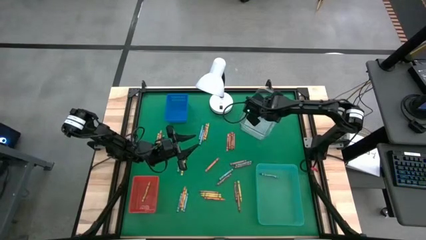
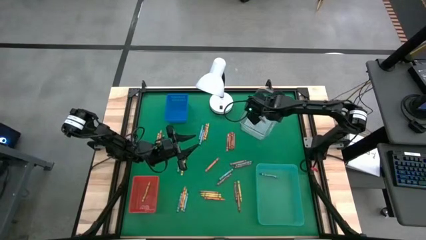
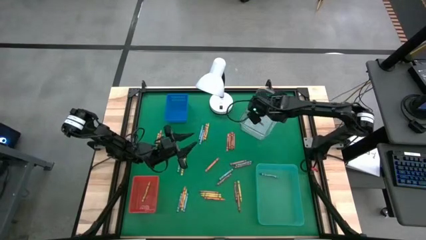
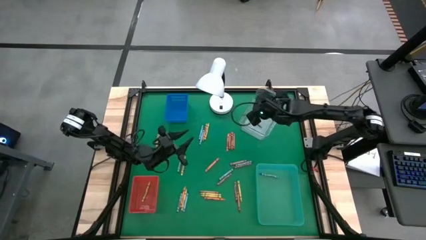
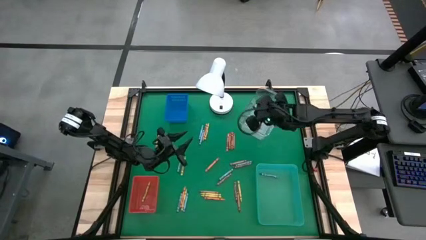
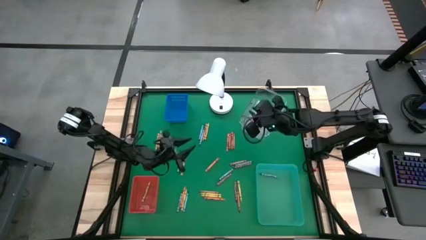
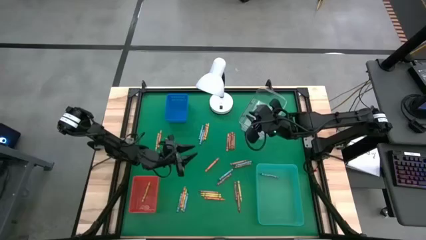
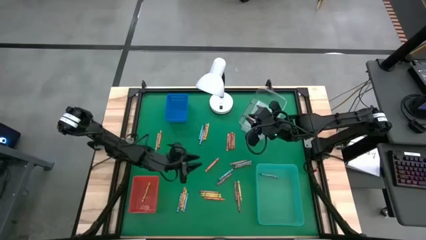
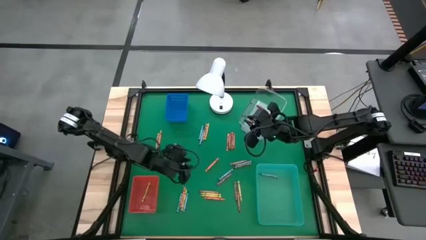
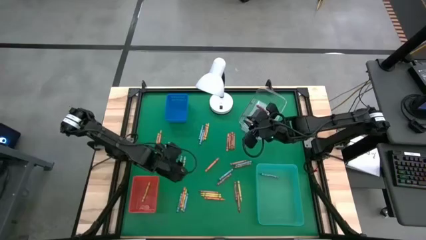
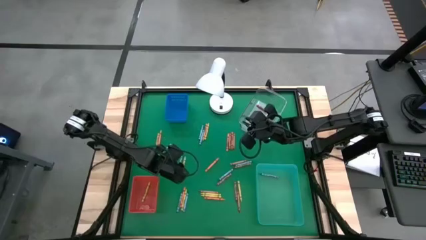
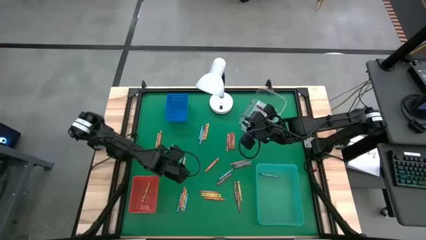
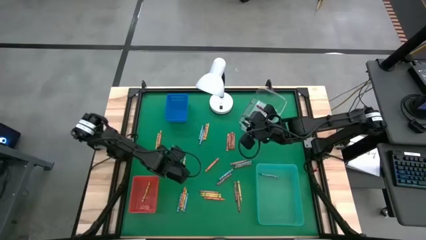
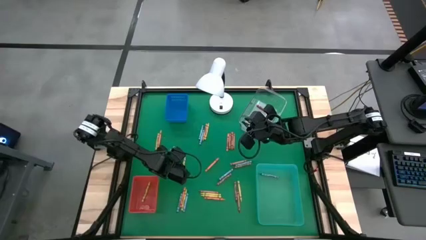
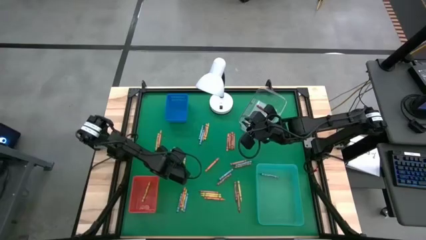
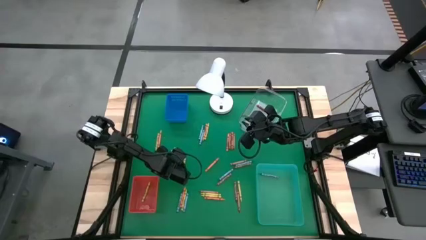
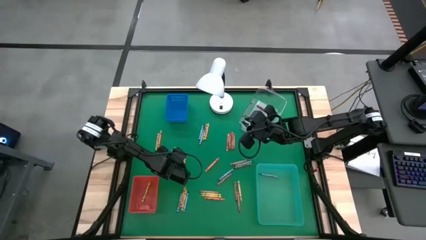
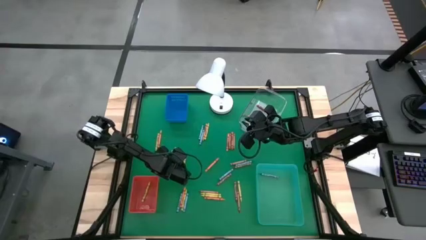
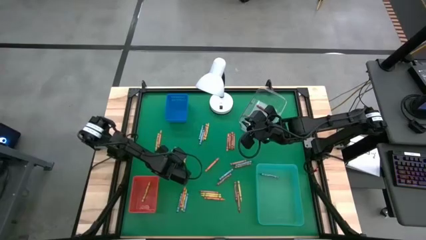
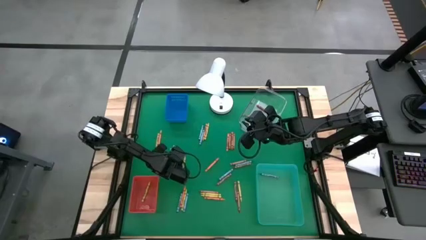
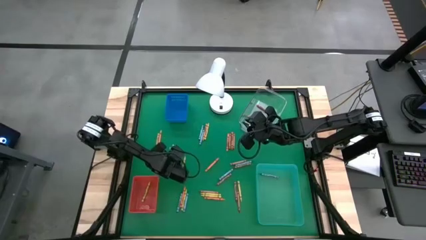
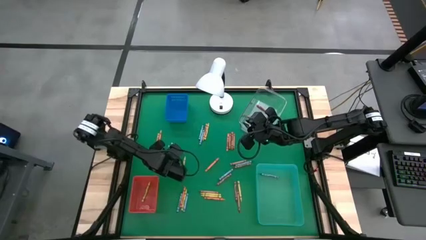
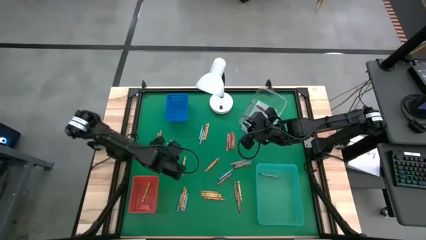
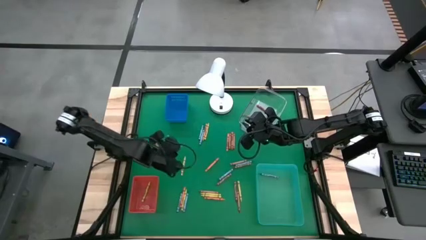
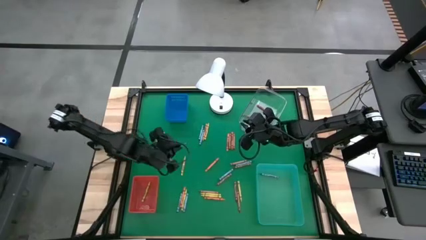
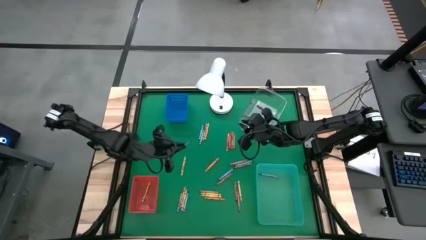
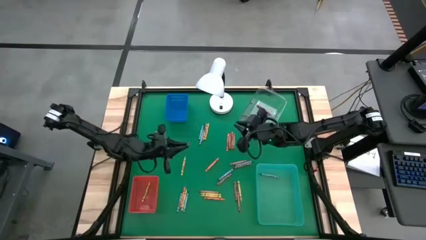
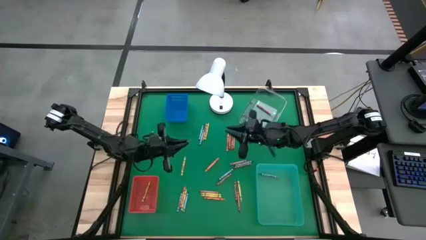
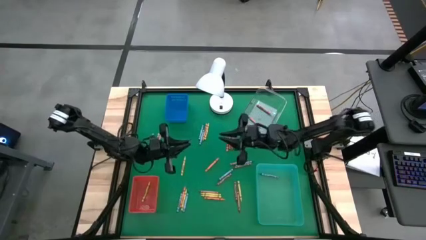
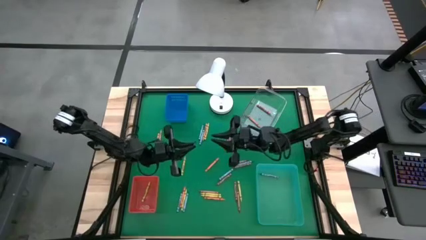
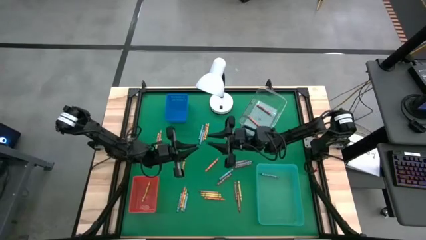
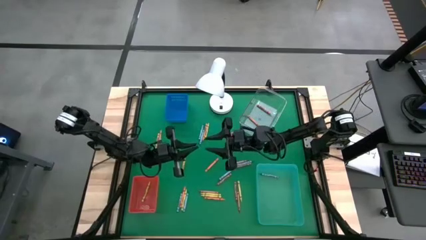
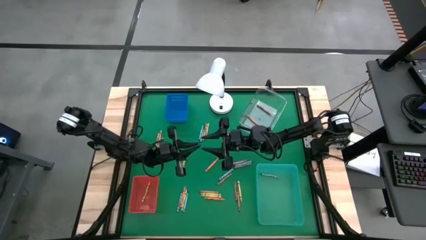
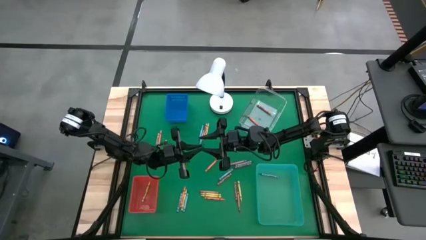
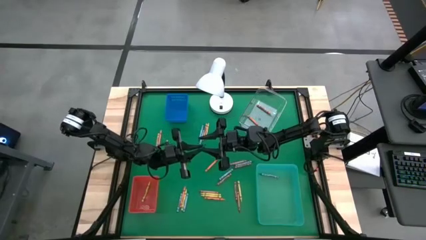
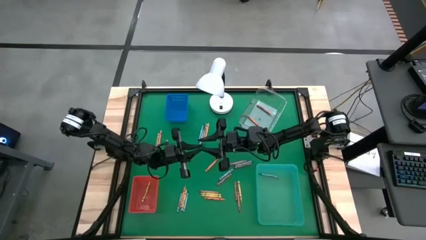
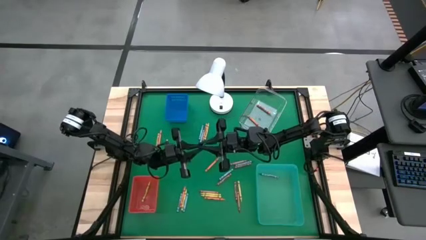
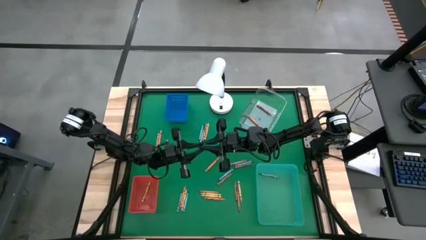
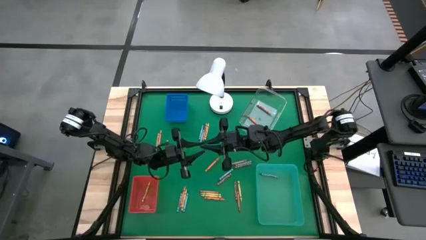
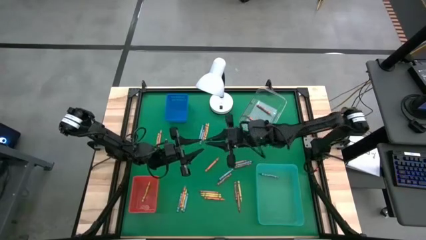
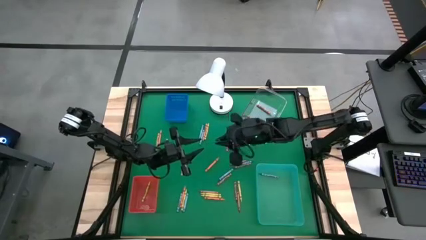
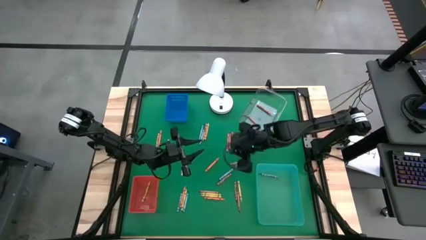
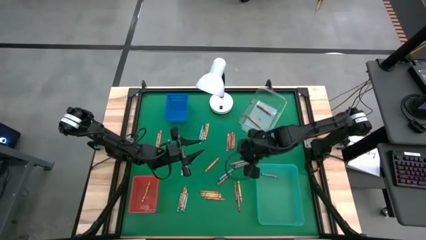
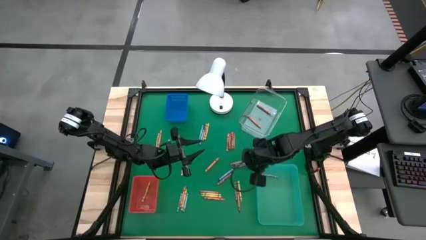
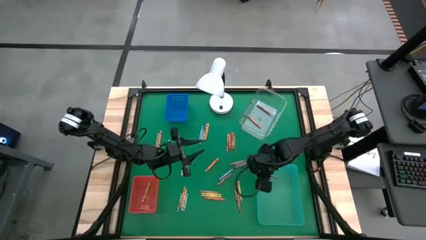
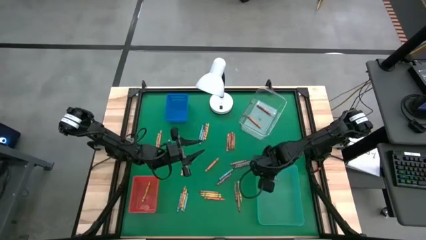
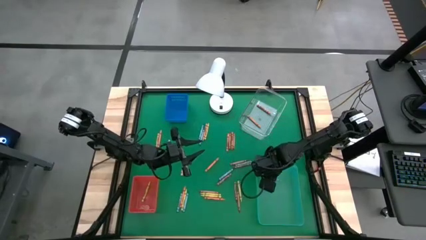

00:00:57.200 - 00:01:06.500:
Task: Sort crayons
Put the blue crayon into the green bin

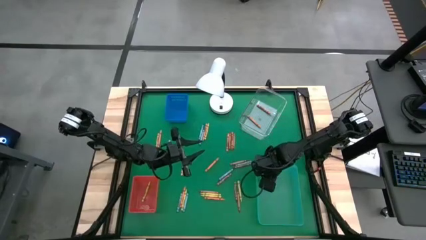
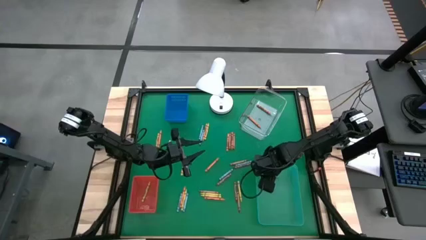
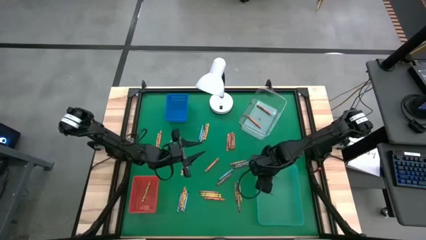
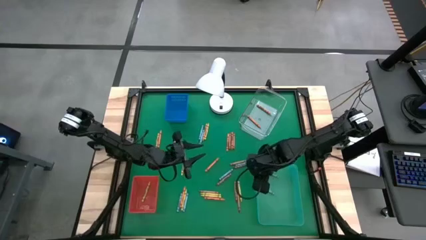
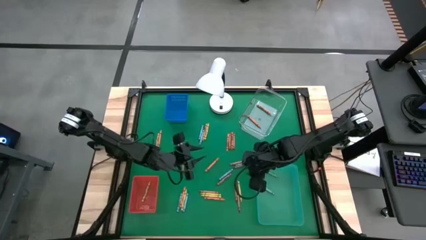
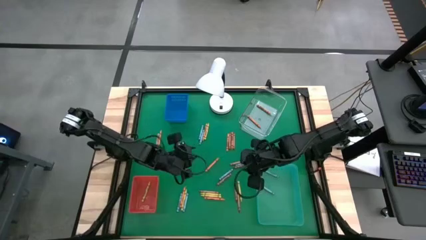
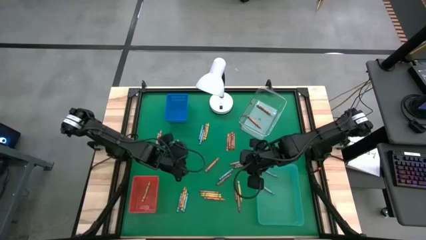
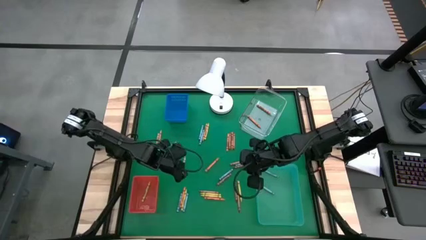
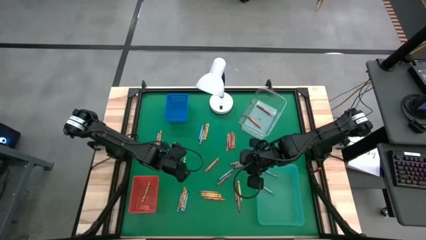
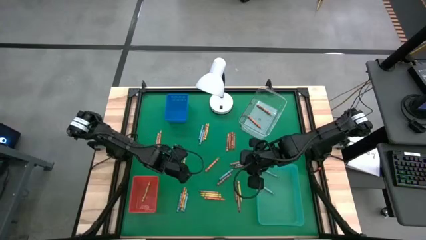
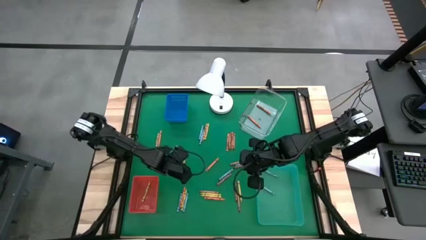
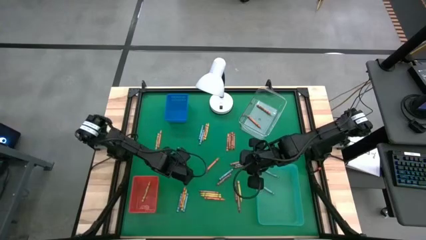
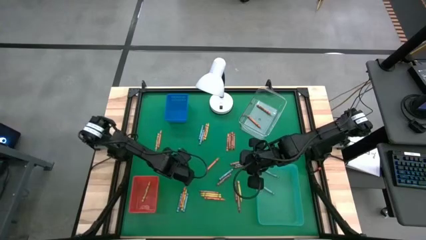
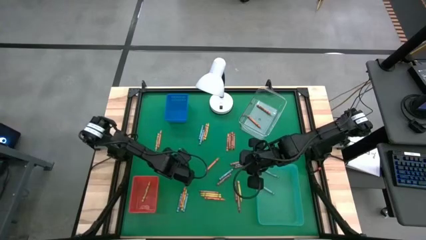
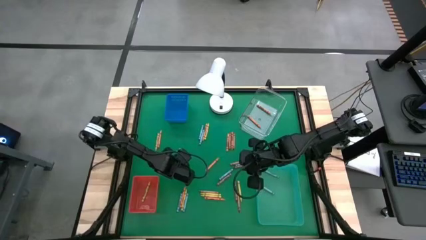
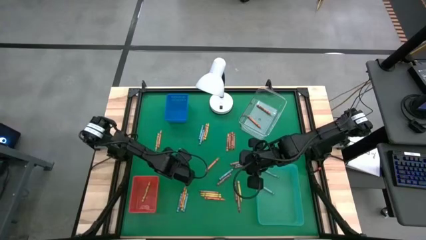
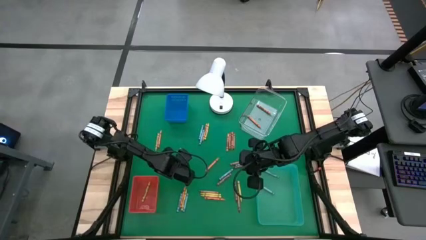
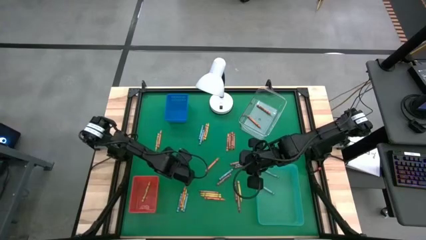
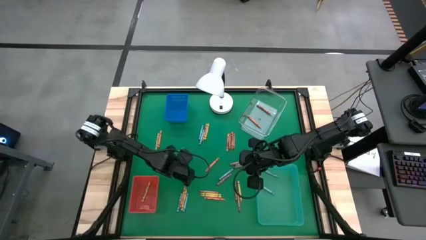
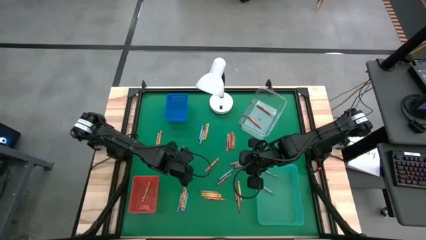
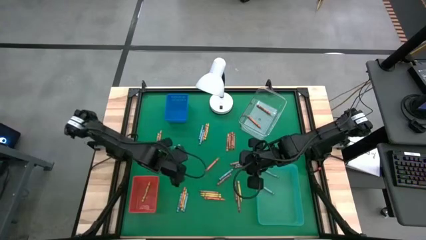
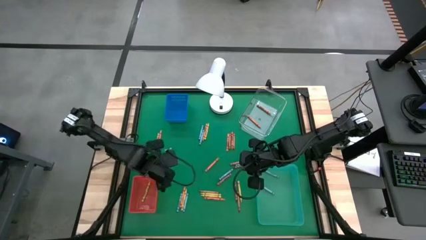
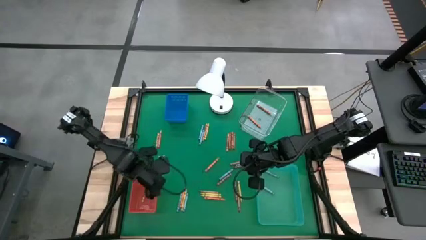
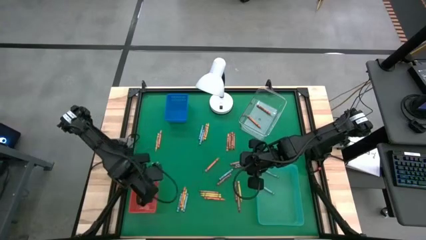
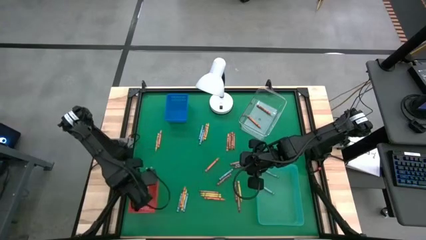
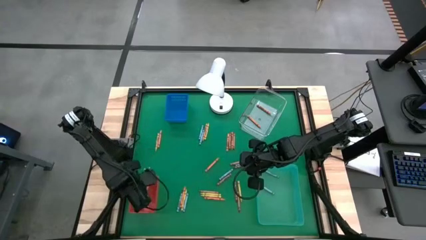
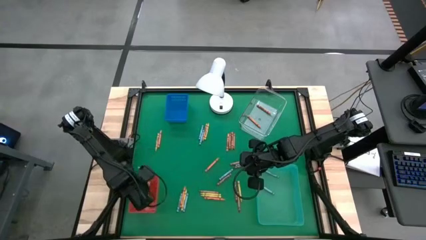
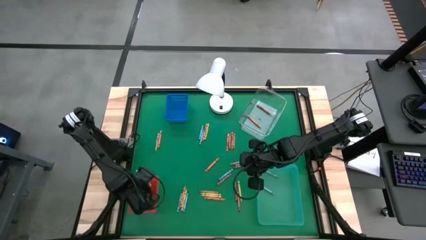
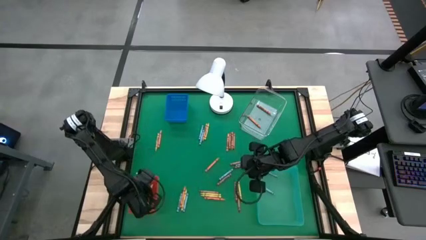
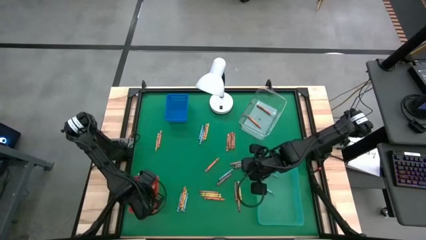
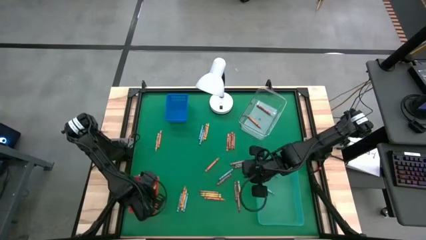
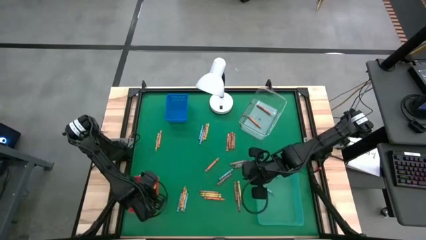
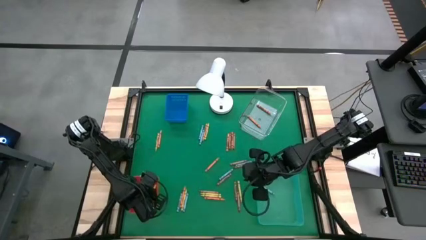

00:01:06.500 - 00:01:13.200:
Put the yellow crayon into the red bin
